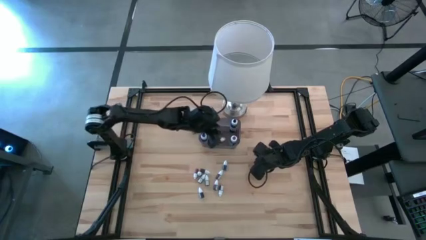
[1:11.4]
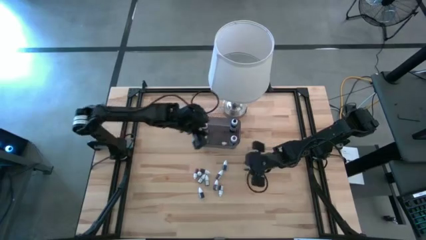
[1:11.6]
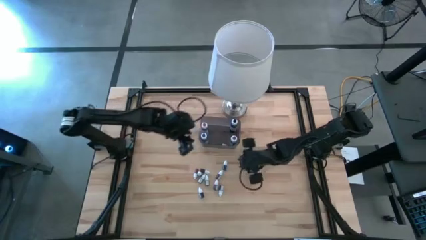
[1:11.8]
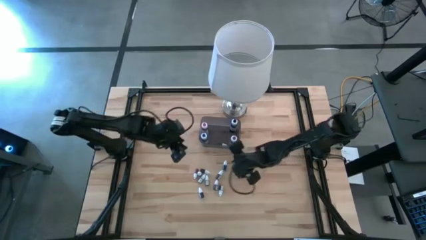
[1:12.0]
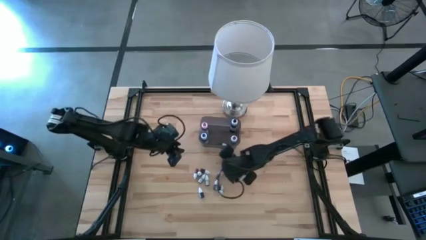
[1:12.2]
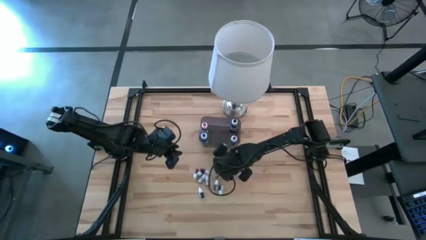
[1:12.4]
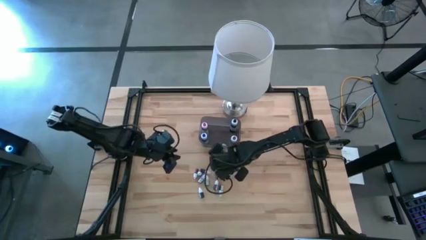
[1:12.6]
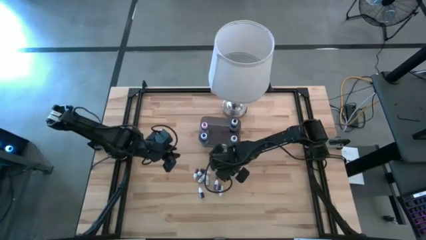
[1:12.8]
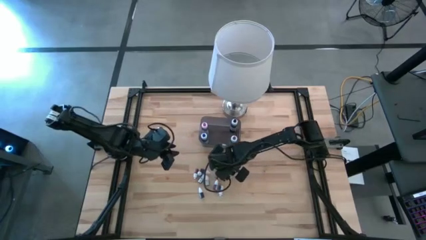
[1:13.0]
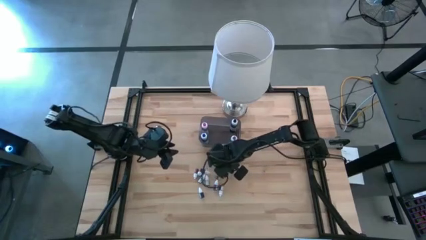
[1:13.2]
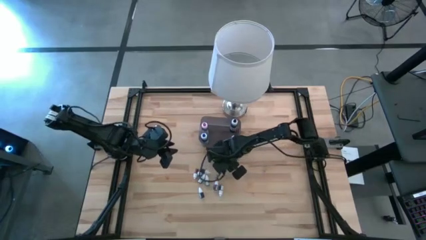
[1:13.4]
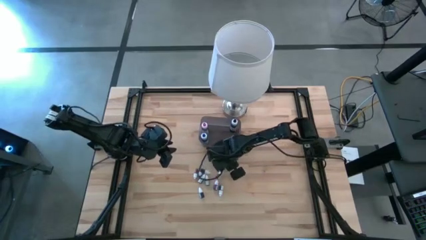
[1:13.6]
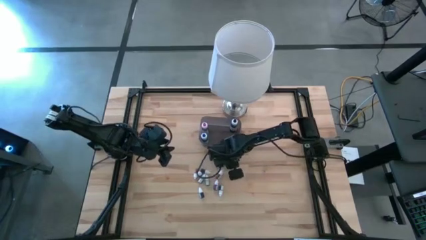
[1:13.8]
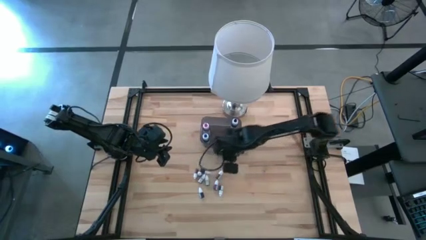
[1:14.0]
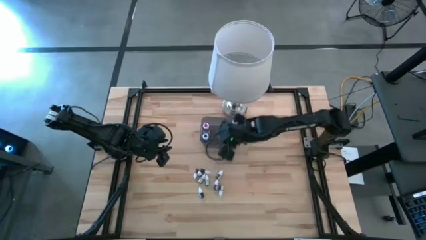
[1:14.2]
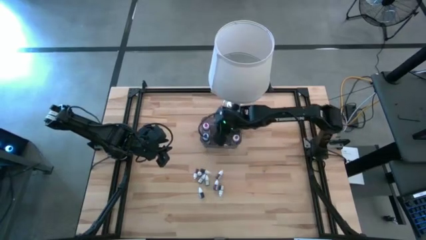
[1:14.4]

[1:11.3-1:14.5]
Task: Pick & Place food coloring
Put the small blue food coloring bottle into the black bin

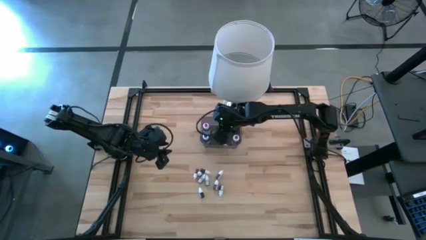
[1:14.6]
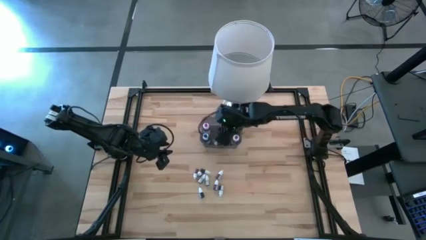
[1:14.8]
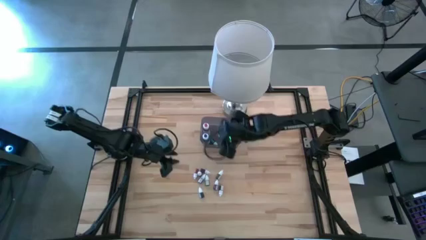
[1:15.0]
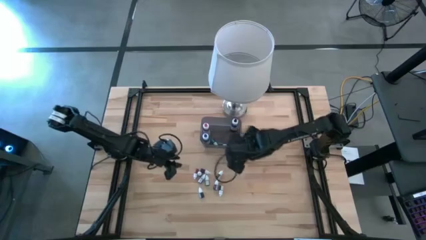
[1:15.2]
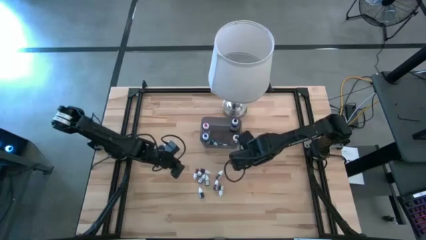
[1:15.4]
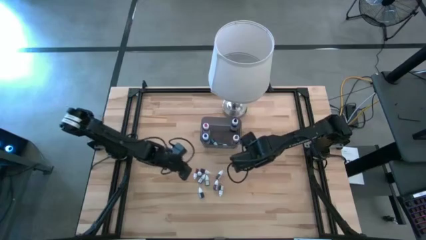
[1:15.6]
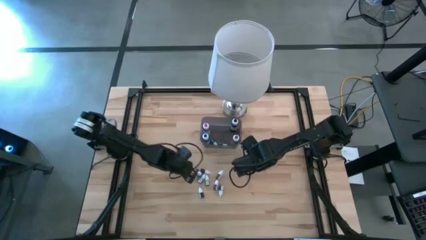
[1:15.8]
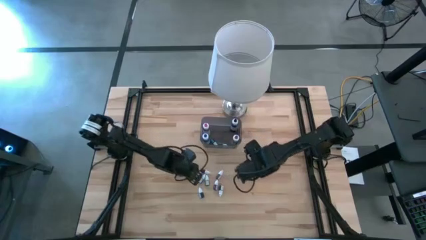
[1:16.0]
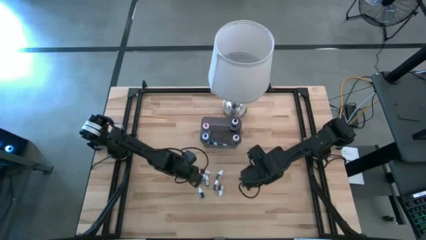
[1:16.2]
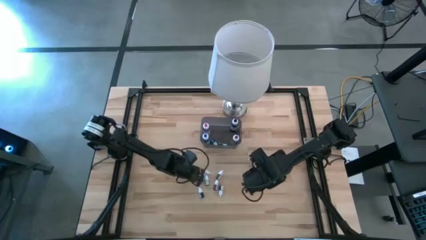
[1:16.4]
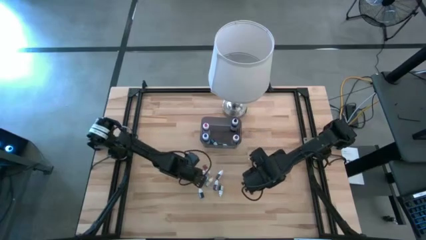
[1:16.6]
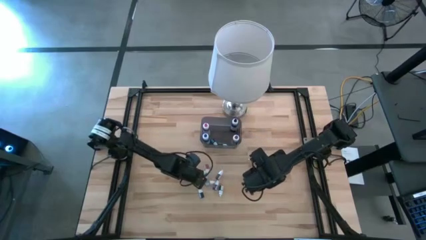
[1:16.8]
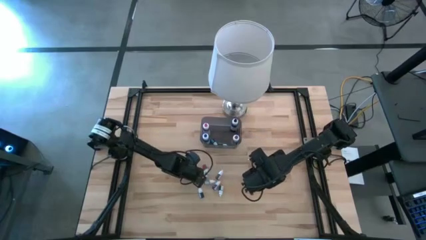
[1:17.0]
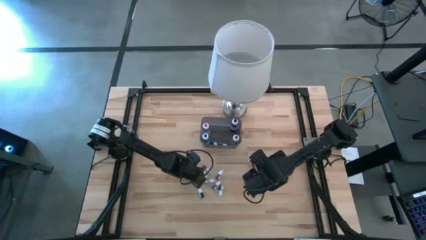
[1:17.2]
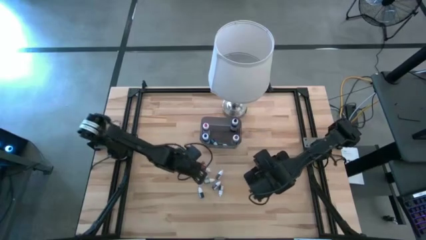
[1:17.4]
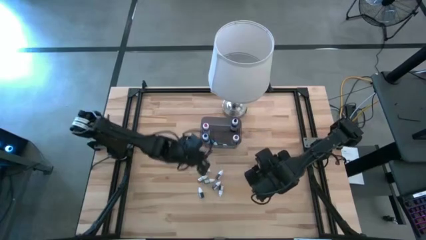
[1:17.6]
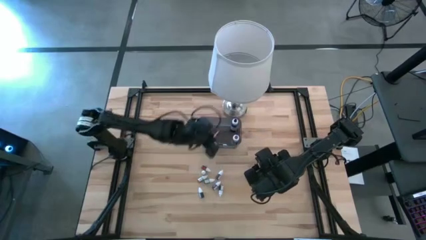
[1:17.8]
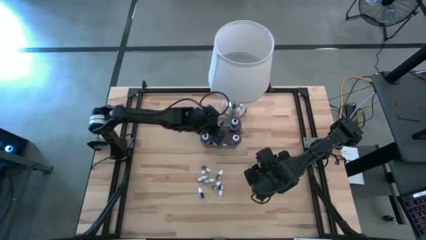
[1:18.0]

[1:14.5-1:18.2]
Put the small orange food coloring bottle into the black bin

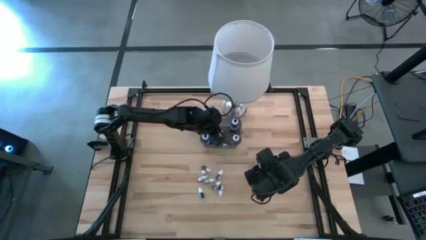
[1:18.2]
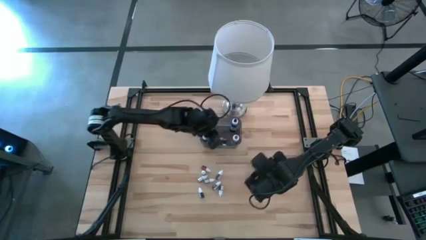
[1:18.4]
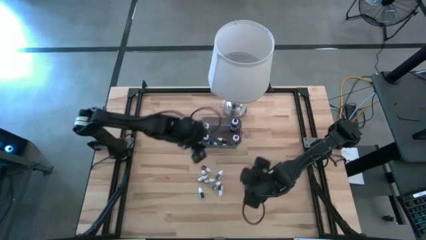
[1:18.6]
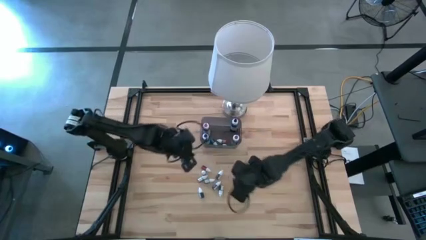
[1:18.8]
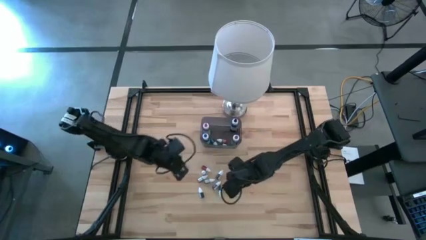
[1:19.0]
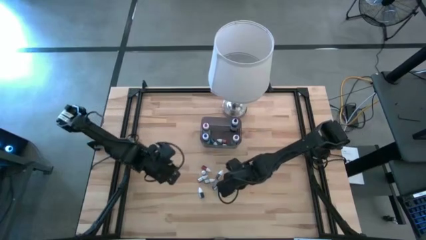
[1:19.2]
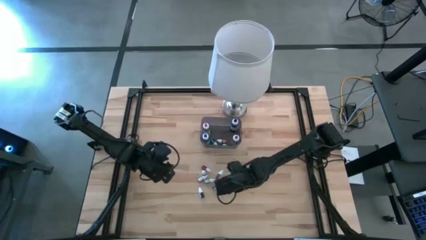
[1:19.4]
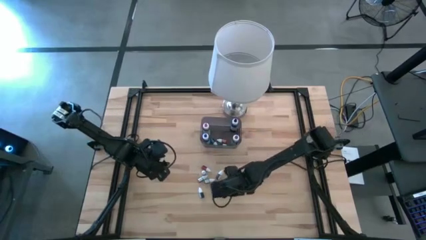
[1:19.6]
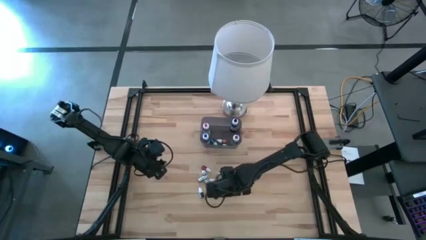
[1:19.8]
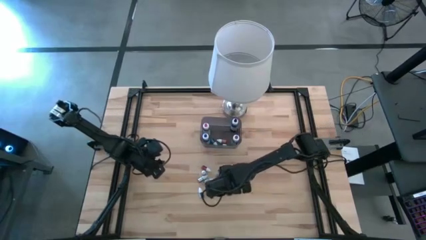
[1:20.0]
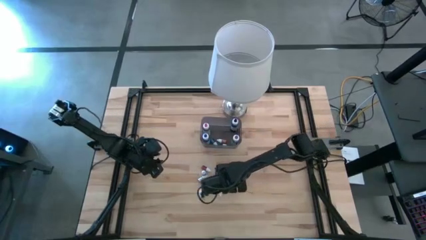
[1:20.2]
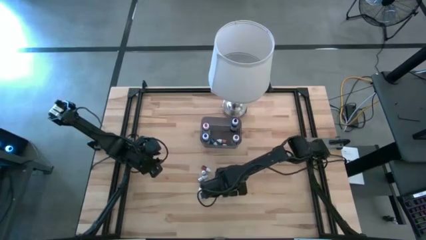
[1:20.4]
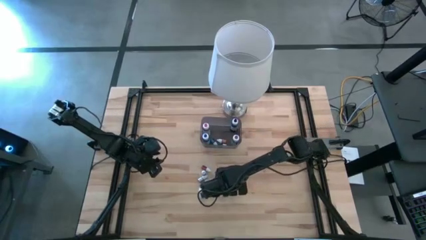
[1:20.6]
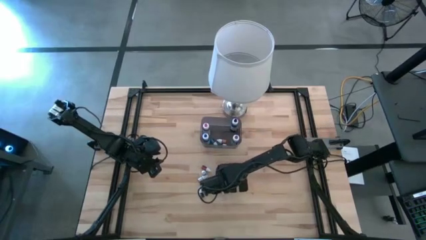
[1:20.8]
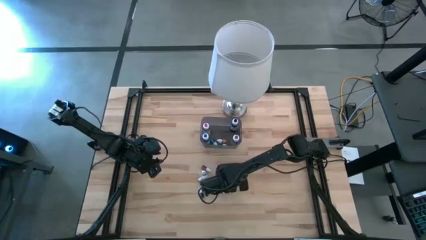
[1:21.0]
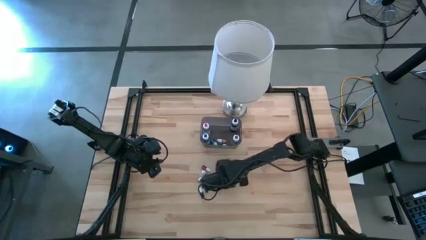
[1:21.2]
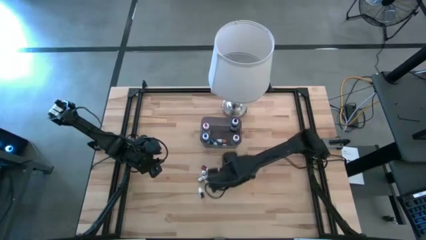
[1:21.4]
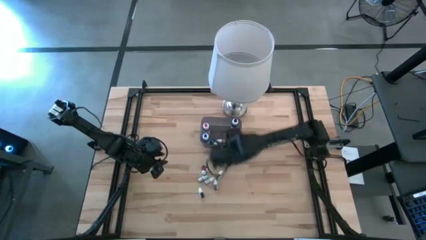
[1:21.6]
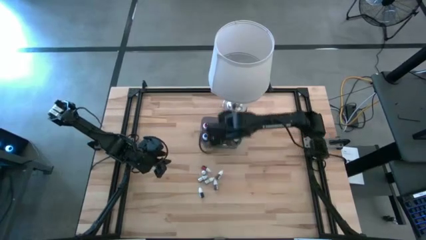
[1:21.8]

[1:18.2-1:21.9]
Put the small black food coloring bottle into the black bin

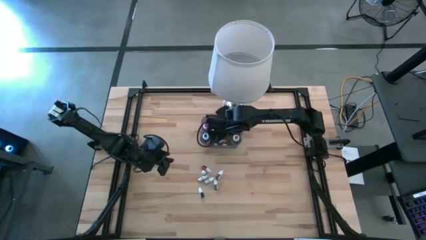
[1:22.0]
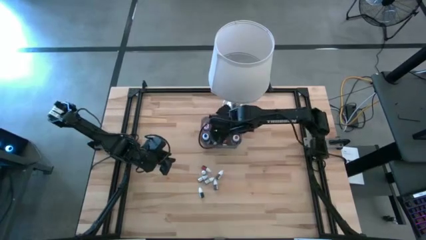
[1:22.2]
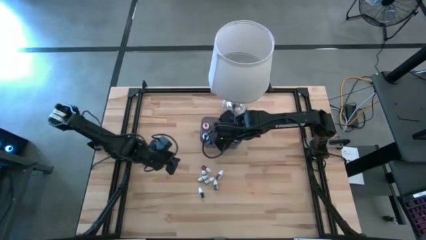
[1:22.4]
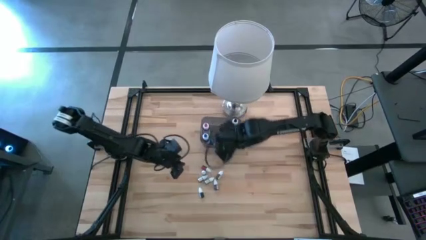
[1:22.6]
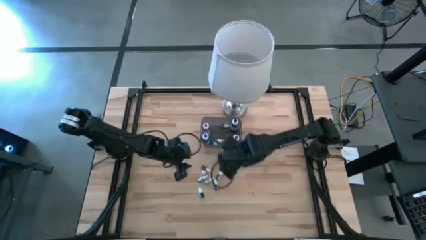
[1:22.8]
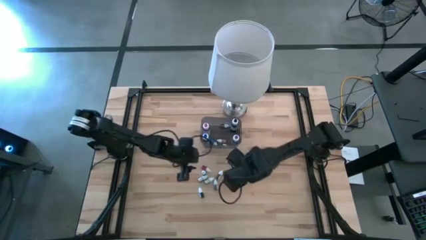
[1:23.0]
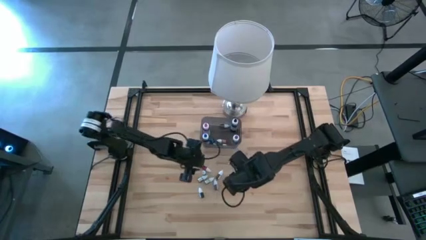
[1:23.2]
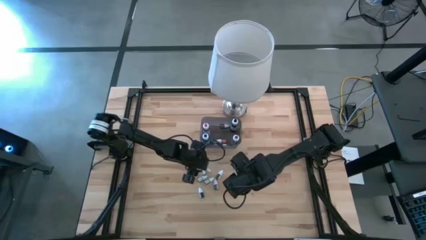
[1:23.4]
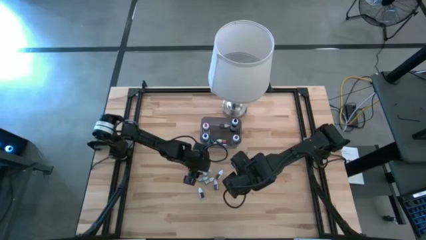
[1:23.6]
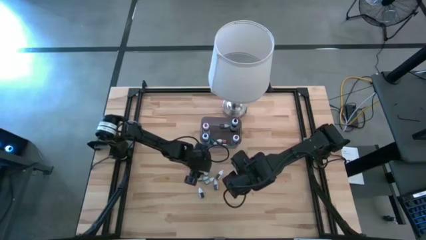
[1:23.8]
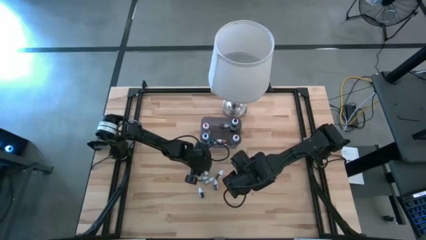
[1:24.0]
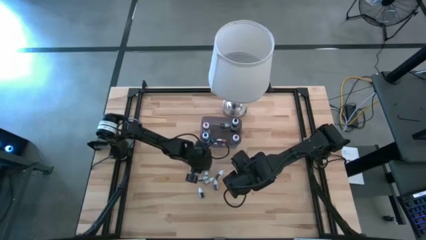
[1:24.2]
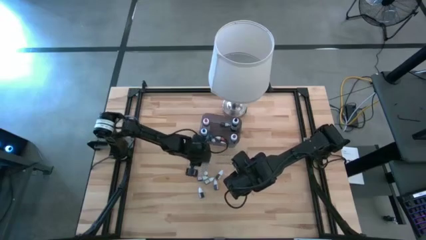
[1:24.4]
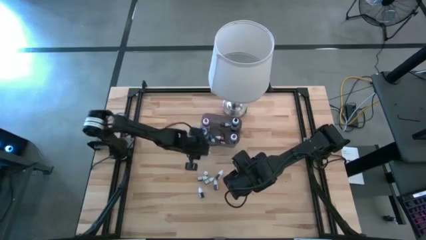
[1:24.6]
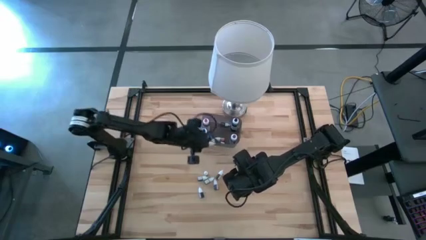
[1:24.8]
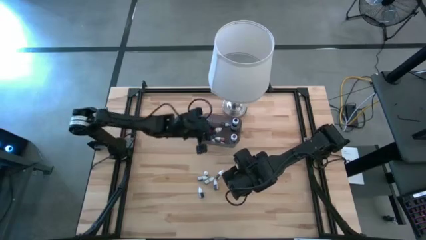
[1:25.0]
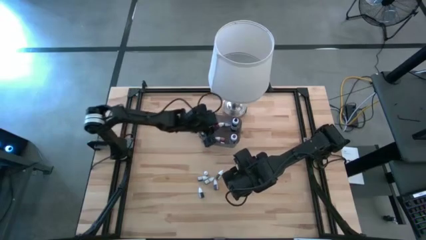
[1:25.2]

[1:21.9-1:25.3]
Put the small red food coloring bottle into the black bin

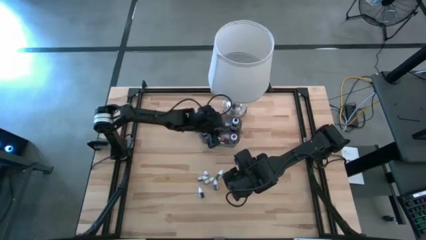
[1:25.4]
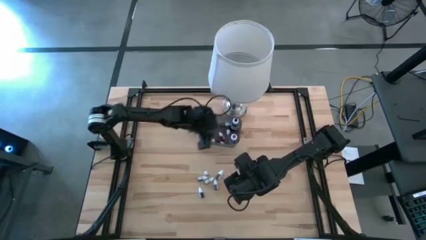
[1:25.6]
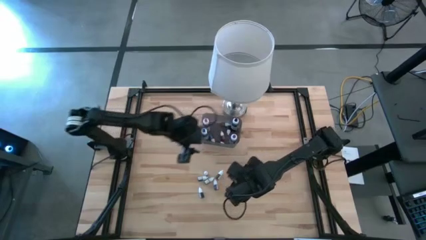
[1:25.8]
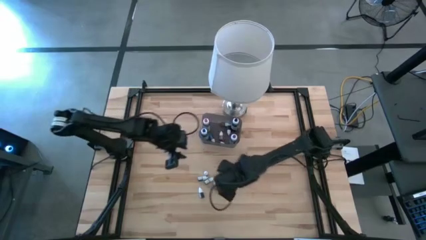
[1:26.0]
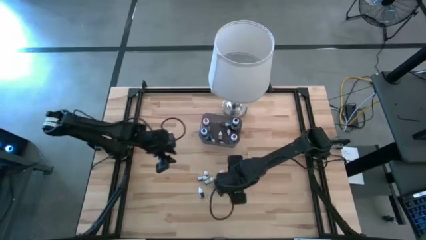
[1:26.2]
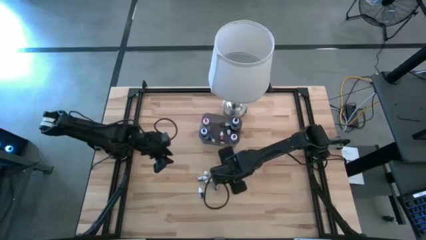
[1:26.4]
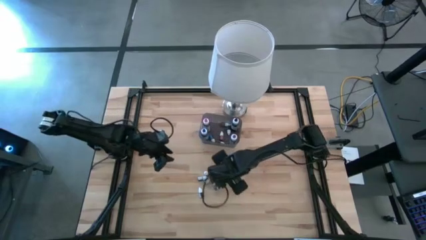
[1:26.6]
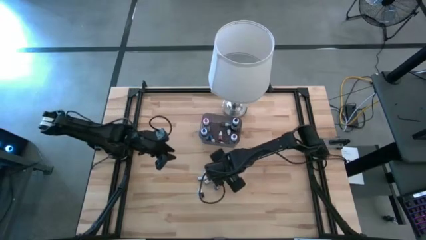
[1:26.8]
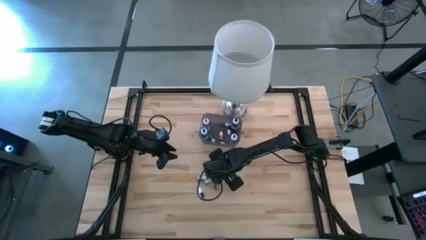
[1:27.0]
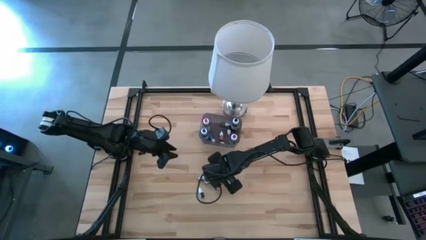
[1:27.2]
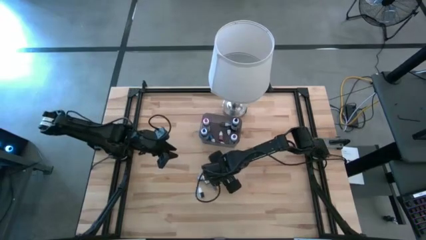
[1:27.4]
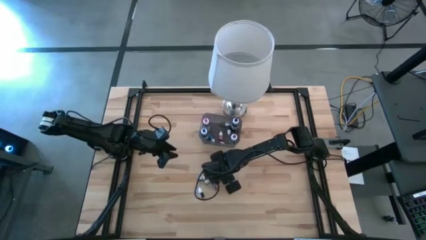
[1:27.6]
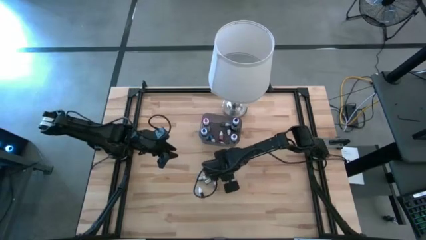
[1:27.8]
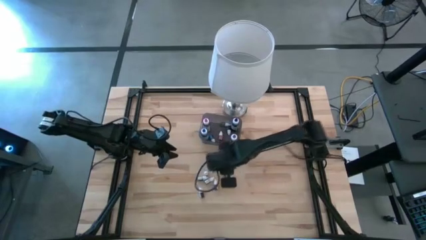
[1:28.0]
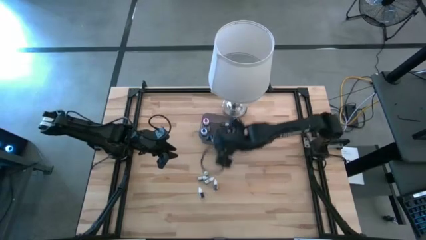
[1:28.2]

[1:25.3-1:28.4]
Put the small brown food coloring bottle into the black bin
